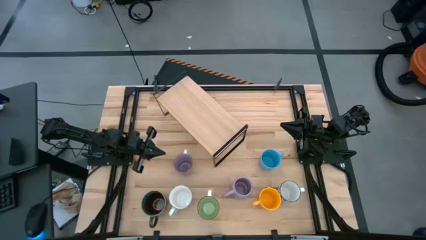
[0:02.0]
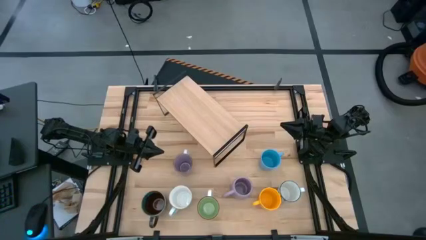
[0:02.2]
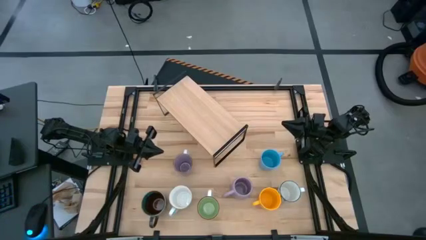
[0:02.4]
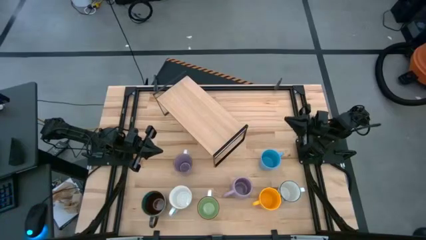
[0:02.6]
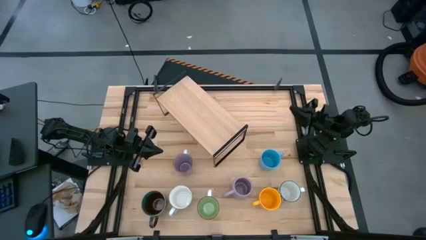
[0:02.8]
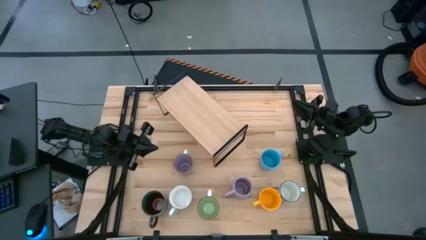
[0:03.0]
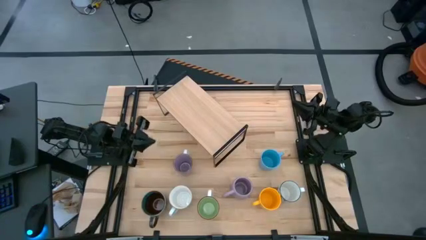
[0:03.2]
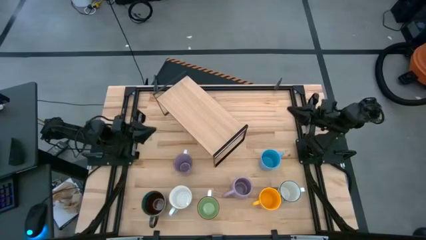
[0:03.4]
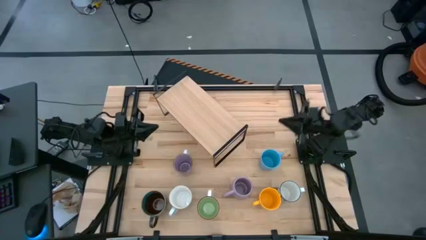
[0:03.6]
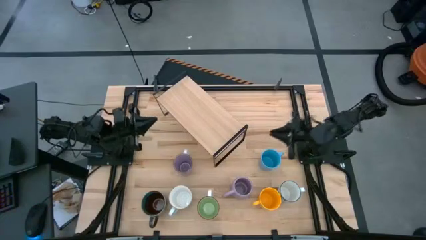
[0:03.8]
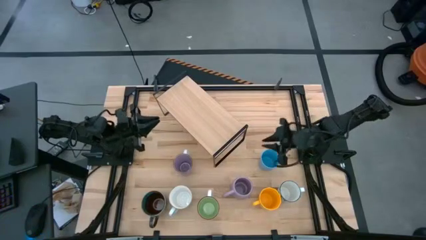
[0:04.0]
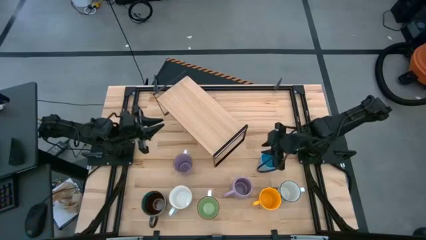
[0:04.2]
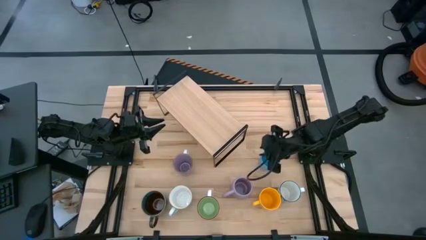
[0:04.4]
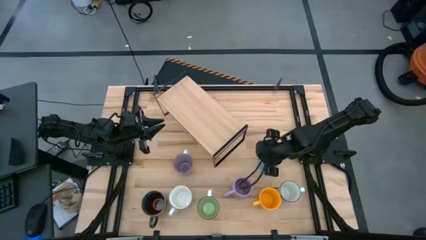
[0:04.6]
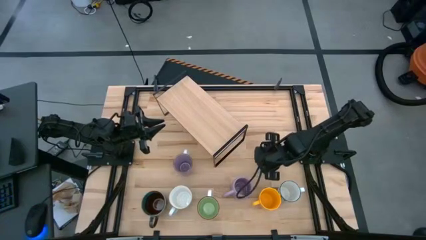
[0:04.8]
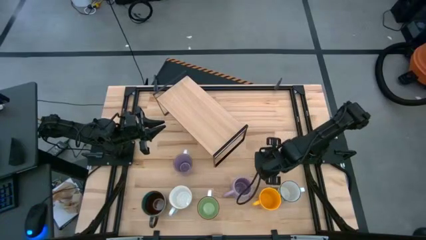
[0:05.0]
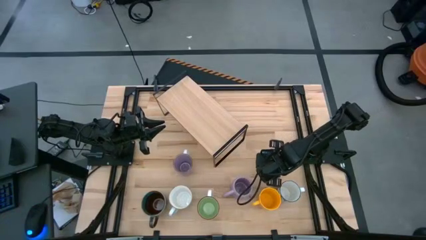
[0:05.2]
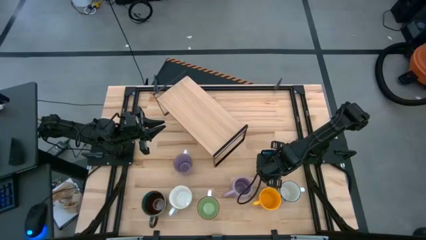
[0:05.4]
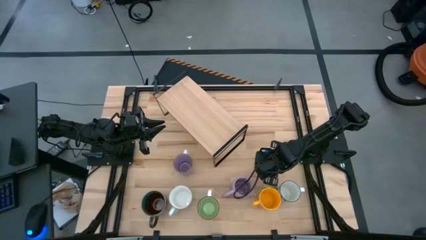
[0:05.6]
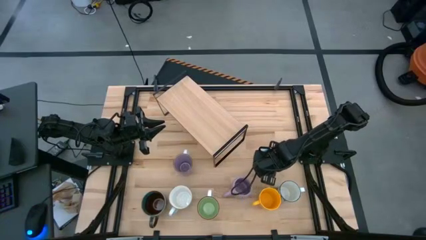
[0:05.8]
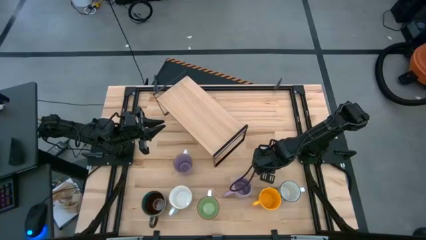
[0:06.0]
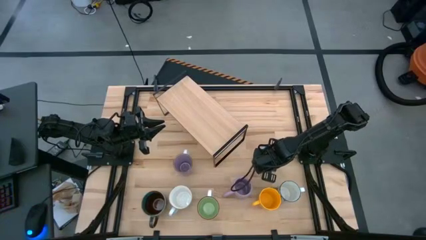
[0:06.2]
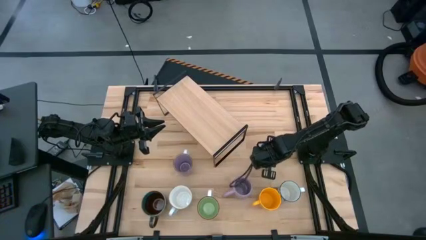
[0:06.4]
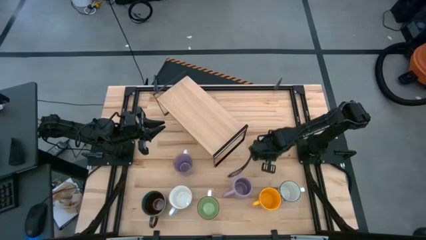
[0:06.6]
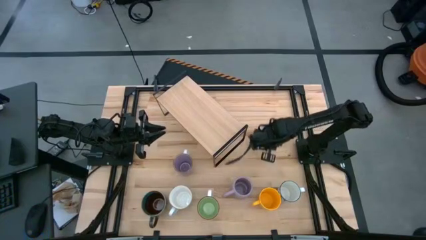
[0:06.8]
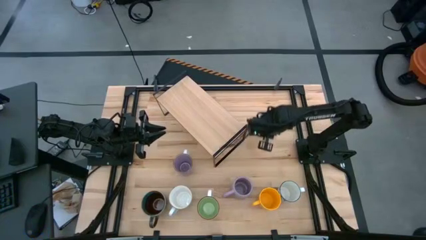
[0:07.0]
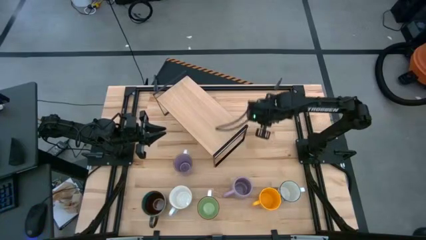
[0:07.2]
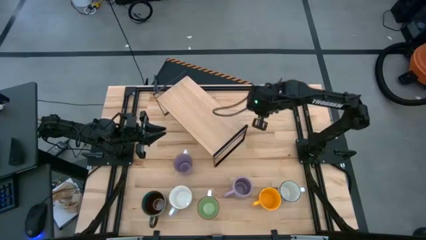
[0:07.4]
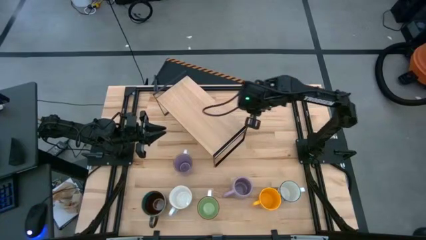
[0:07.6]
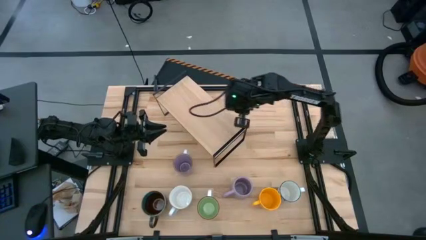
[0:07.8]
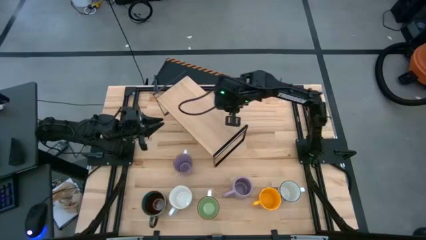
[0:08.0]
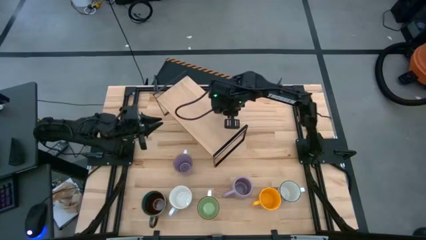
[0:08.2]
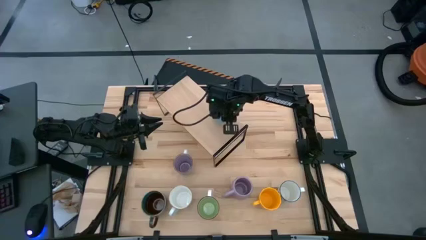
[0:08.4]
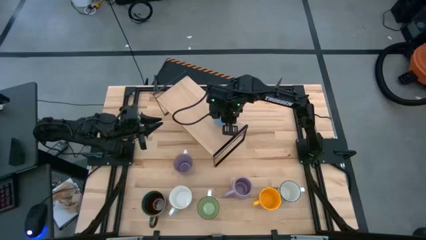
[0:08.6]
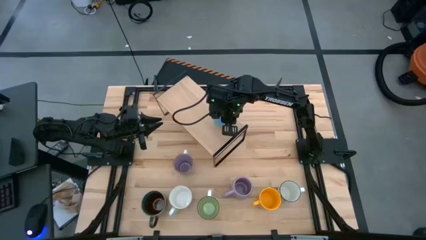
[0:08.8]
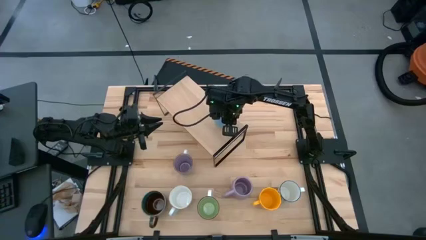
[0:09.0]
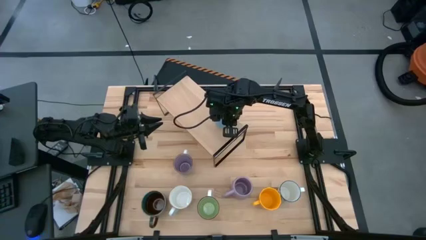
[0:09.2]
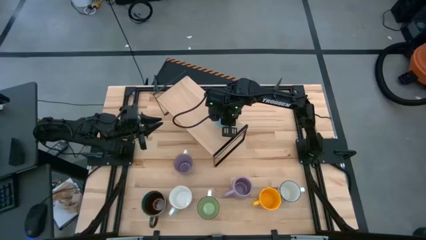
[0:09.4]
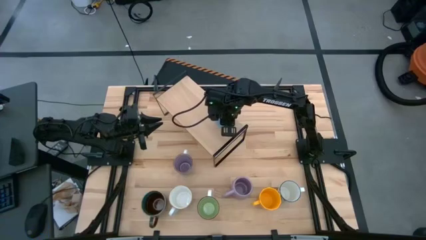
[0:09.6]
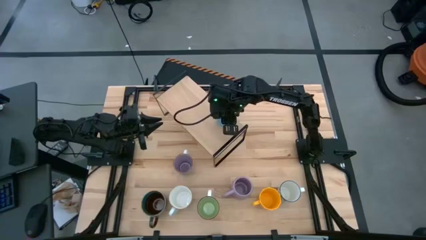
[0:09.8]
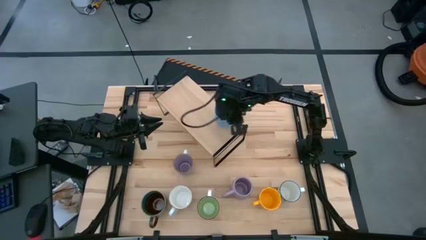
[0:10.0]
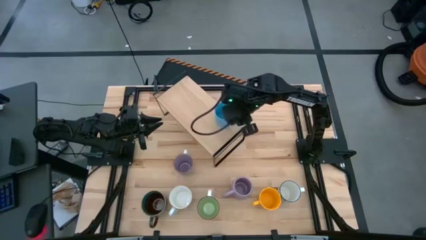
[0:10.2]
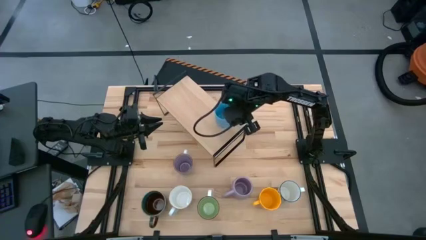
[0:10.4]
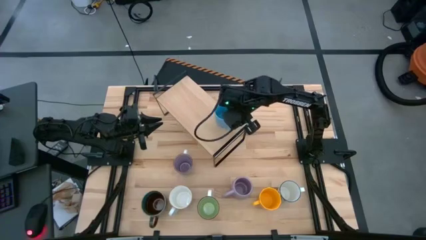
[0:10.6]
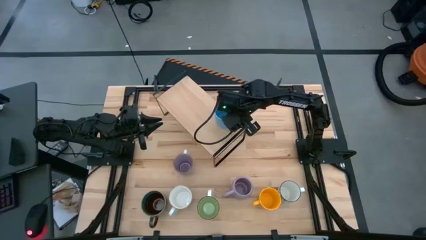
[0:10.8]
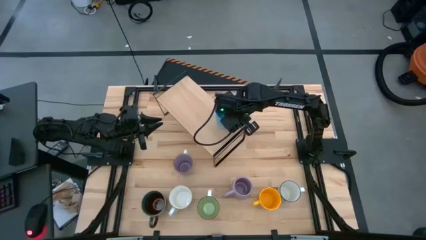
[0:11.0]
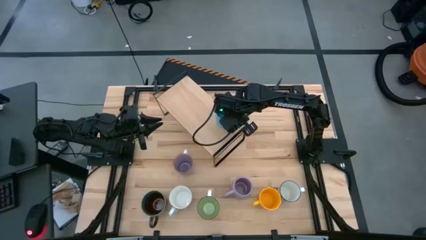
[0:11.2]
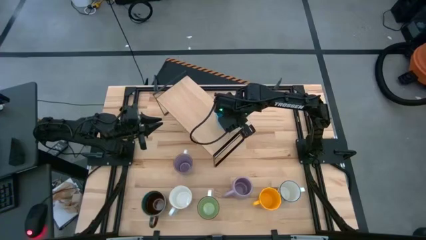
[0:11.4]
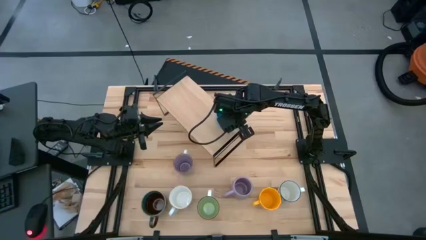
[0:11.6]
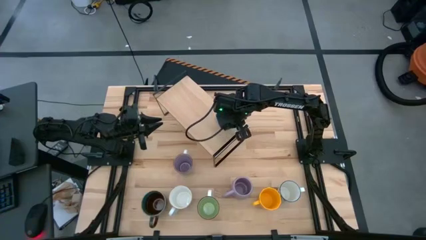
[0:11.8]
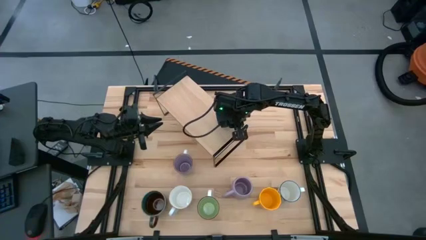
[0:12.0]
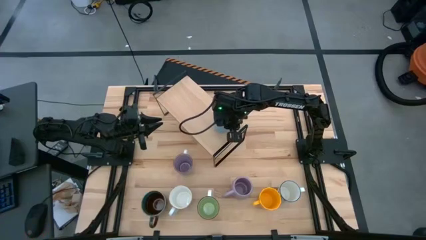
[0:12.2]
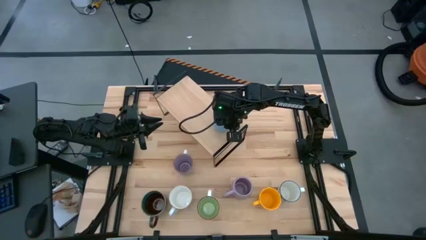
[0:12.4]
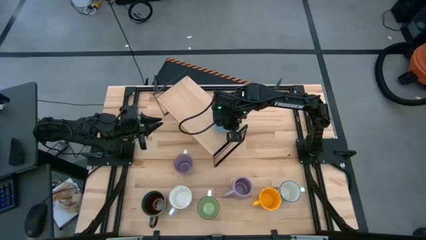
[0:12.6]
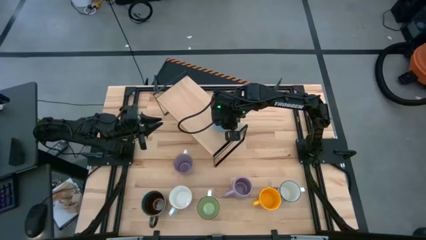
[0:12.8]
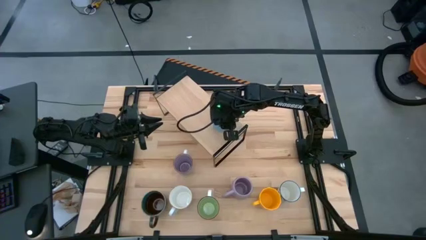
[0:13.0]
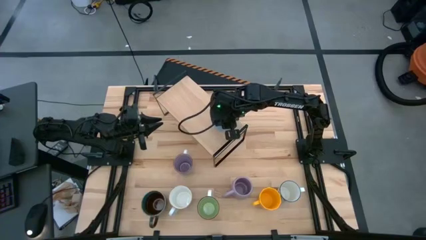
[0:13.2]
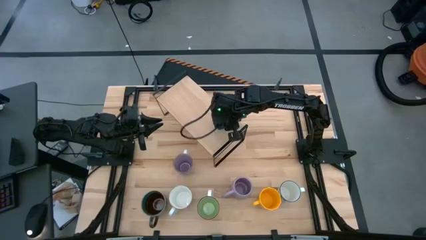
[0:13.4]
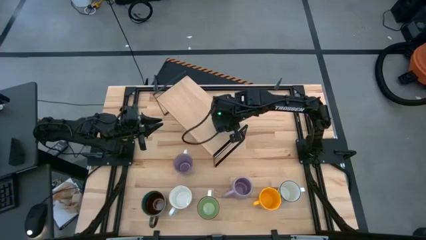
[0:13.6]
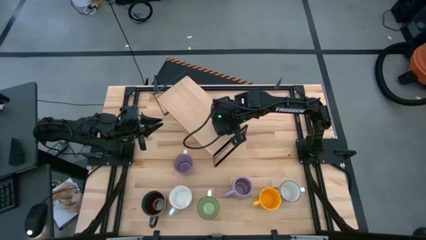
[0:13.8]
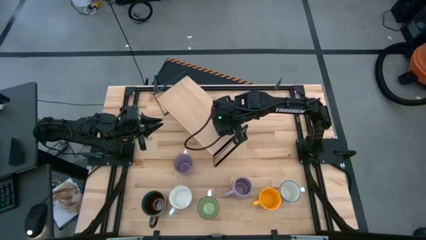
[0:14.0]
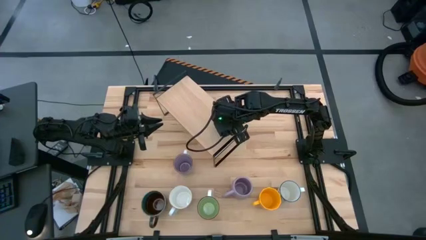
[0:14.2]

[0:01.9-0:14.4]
Task: Place coffee mugs
Put the light blue mug on the shelf
